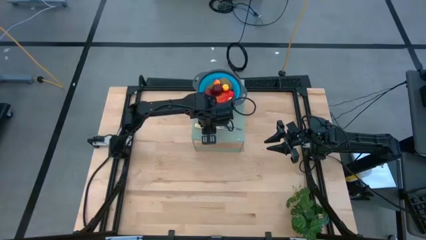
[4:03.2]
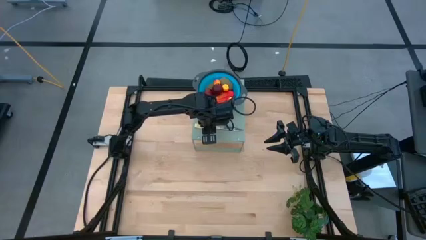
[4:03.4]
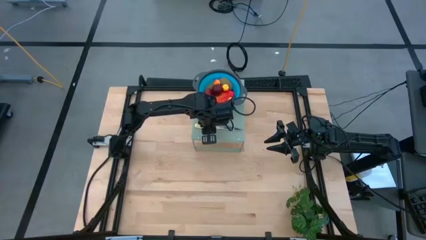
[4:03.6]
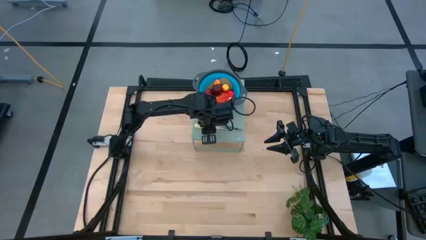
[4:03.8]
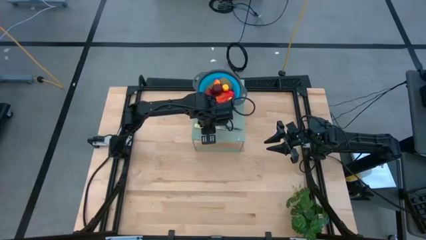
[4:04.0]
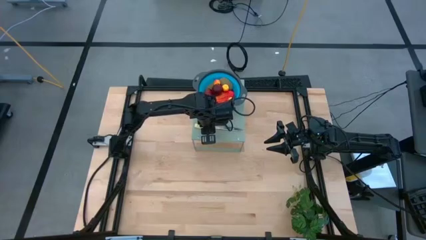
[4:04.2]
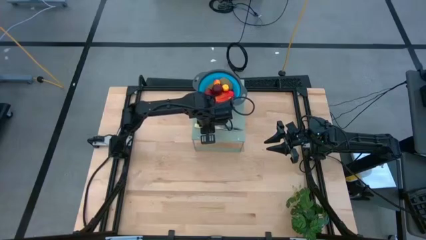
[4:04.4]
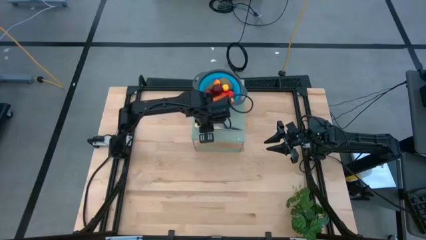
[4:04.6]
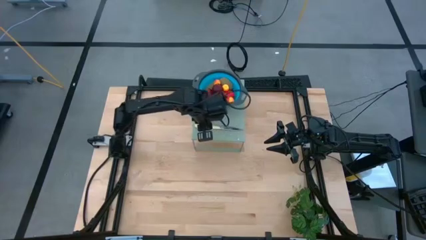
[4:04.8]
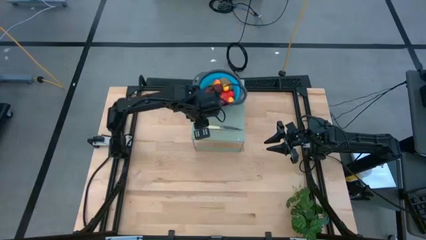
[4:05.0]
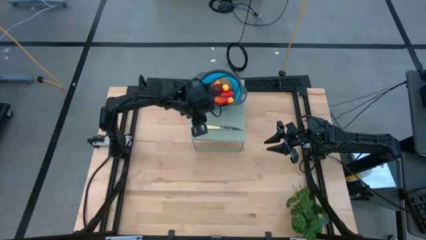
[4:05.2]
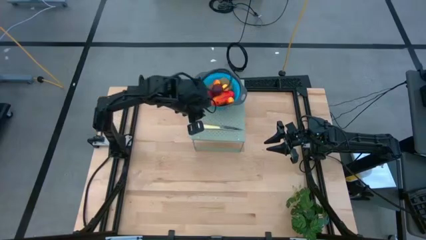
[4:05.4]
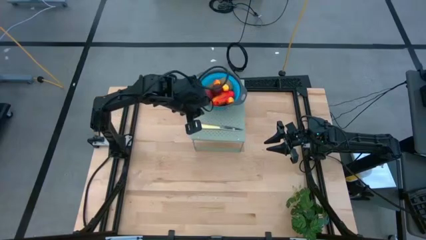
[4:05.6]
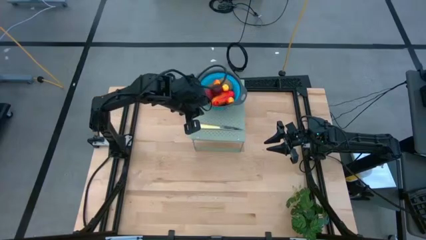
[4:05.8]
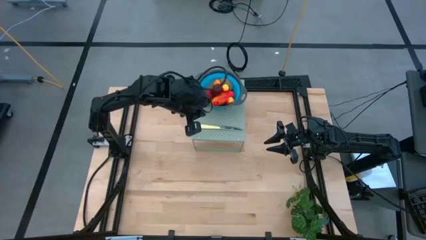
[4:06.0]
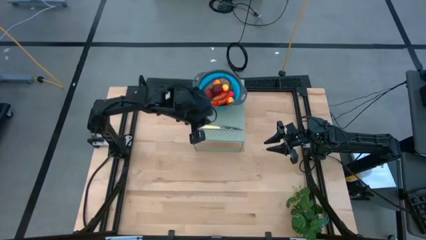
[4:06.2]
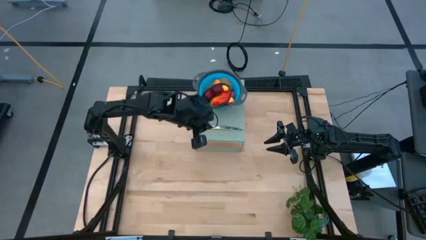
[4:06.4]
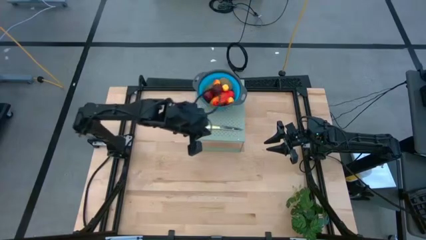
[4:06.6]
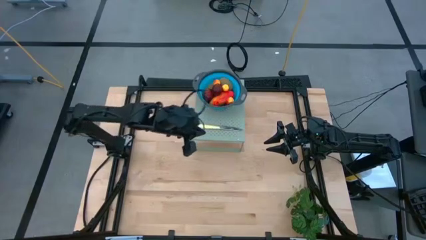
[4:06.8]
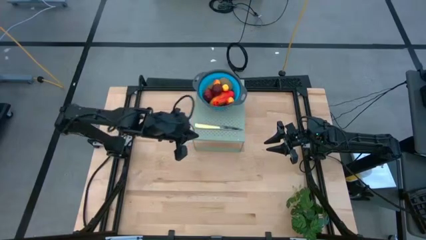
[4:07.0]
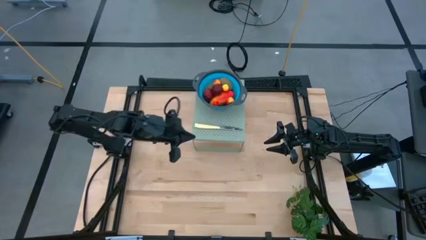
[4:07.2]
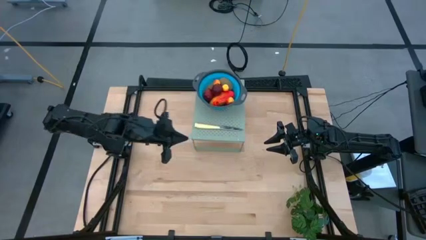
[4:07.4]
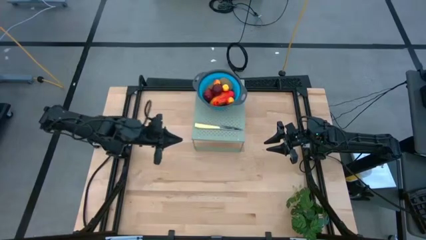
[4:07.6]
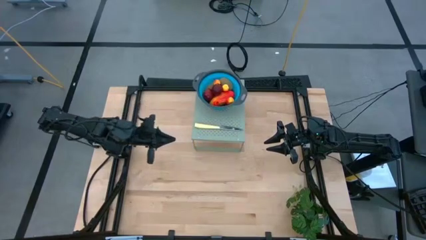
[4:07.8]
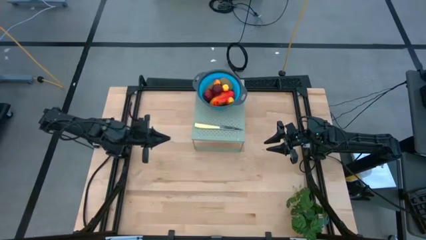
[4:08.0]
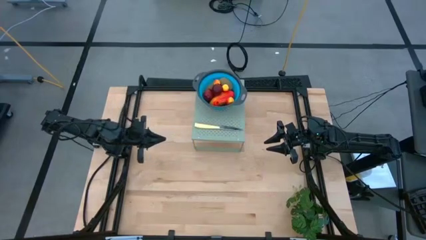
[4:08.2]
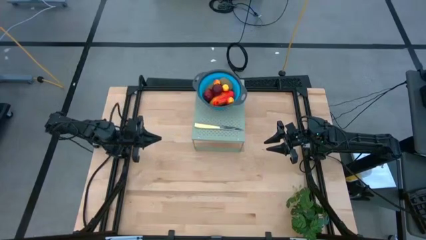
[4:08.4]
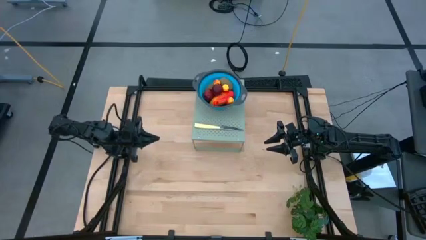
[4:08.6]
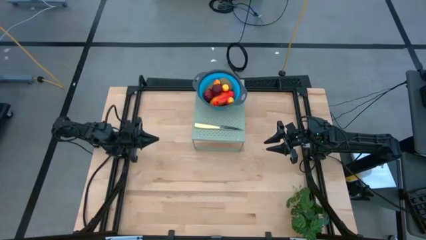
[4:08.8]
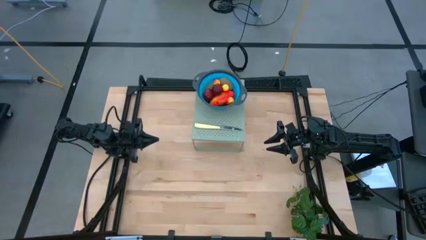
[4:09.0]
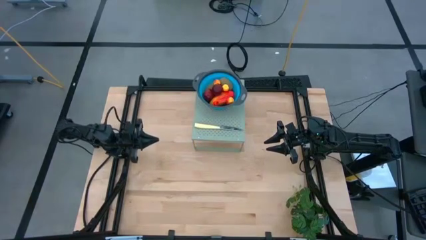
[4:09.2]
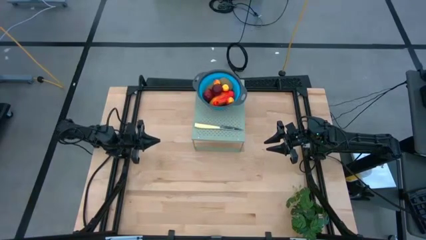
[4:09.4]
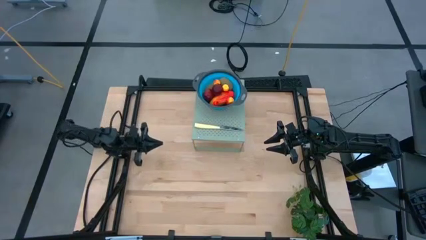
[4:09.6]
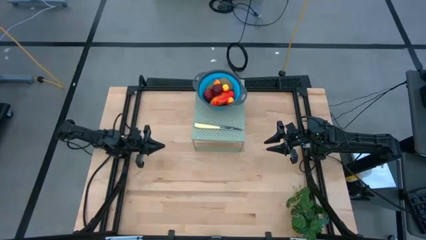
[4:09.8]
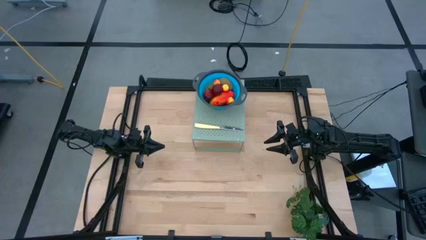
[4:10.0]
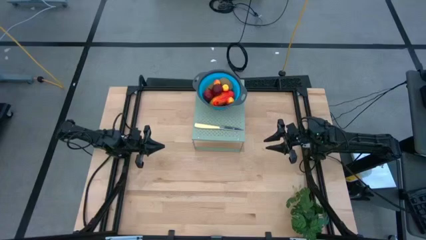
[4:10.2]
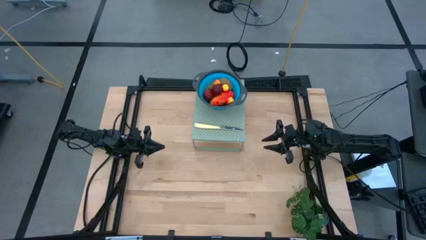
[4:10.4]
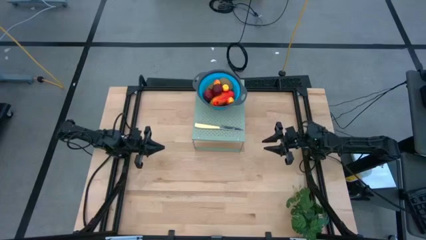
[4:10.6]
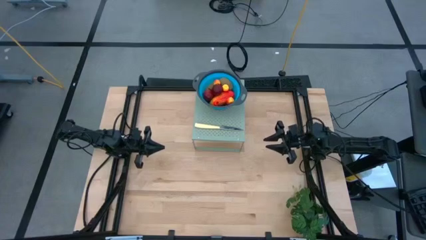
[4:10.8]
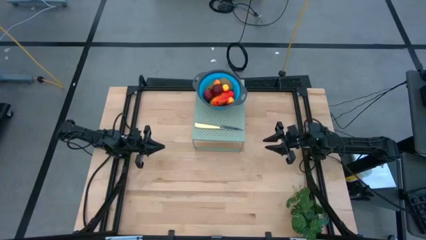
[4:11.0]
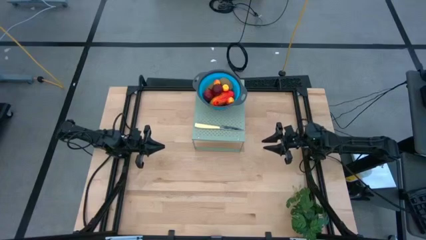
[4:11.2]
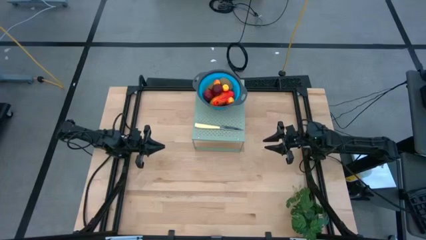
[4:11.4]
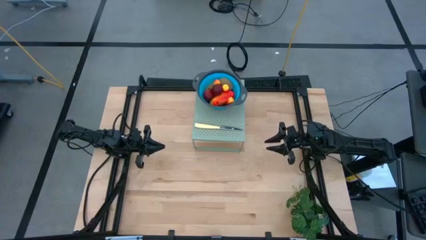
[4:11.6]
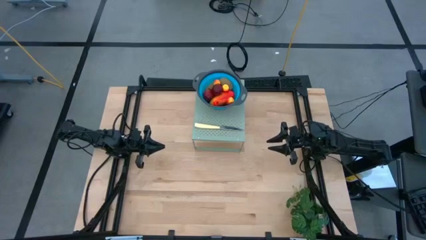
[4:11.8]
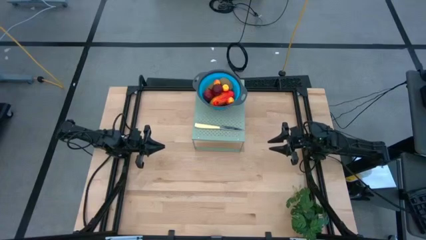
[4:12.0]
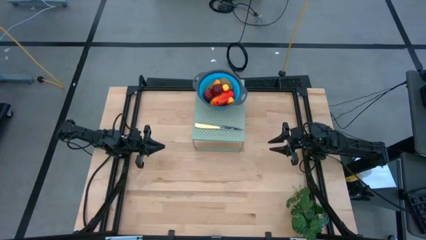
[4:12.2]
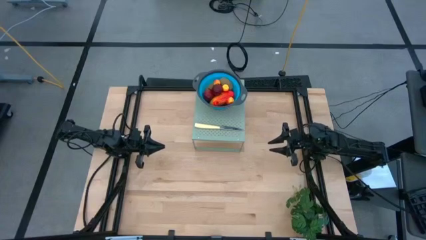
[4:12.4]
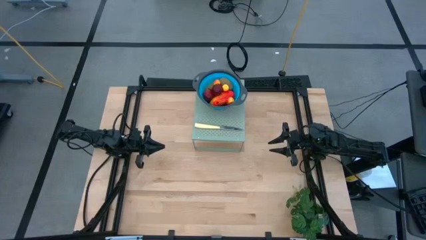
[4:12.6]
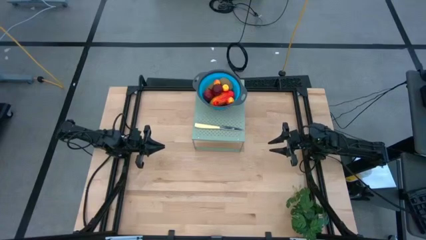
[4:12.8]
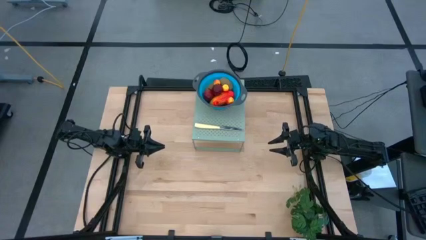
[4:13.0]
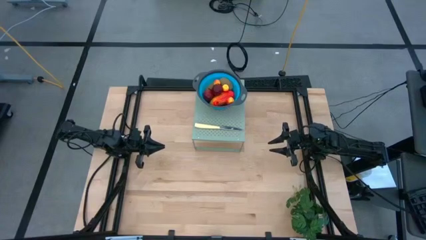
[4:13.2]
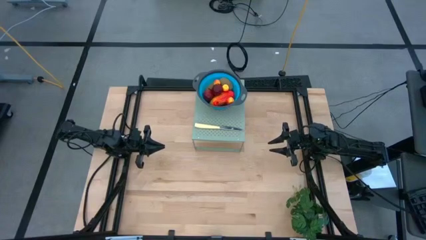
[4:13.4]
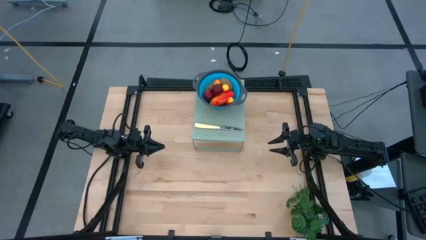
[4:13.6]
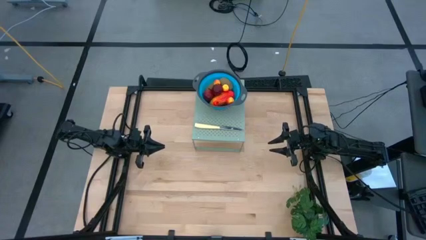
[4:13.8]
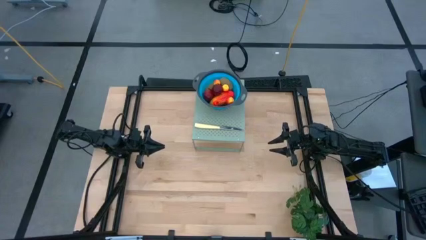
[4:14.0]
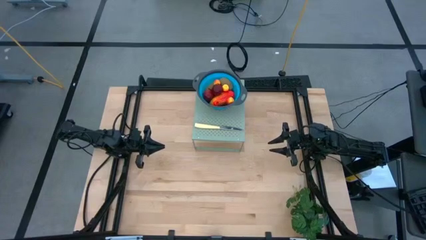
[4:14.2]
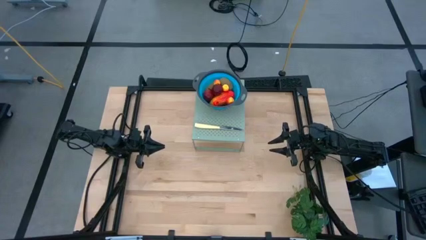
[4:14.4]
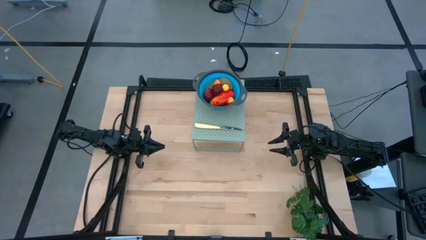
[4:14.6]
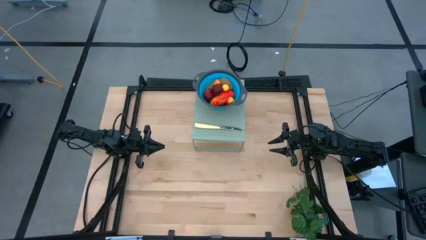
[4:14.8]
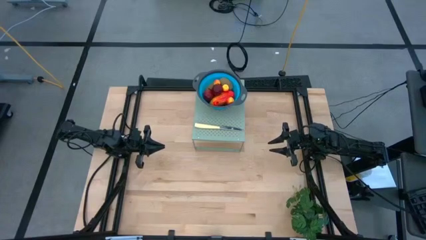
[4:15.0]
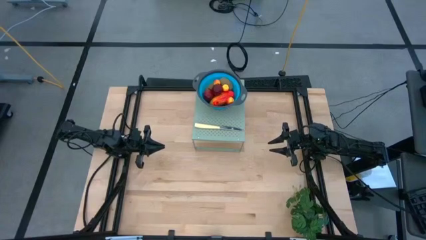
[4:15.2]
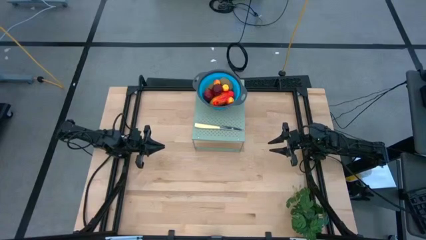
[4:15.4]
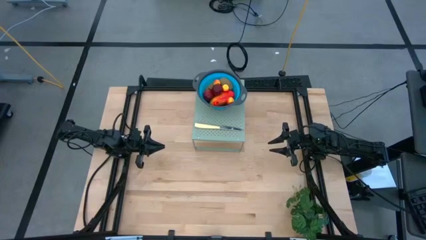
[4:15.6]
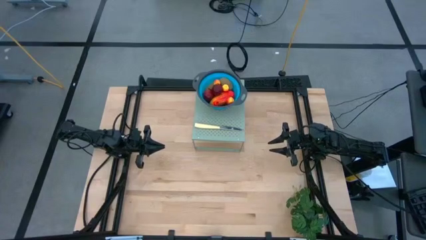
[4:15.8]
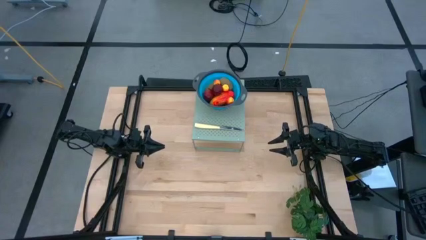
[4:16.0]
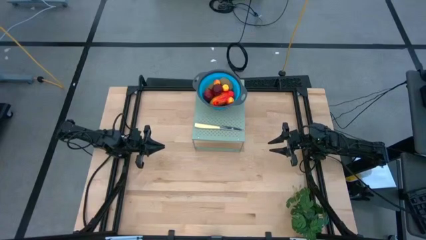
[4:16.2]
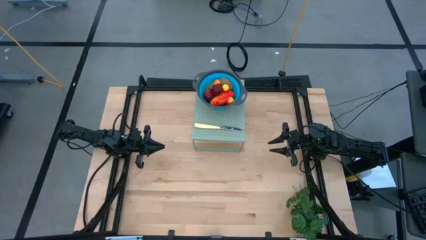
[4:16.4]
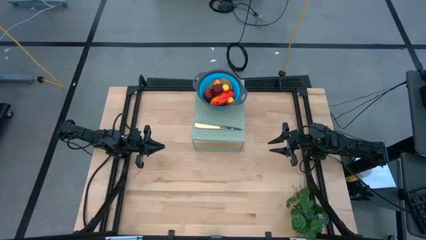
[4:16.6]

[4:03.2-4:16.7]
Task: Pick & Place Fruit
Return to Home Position
